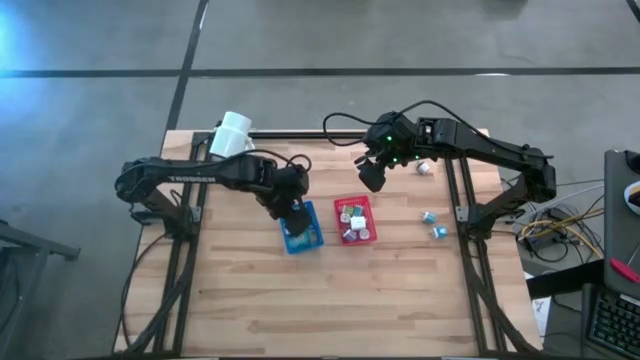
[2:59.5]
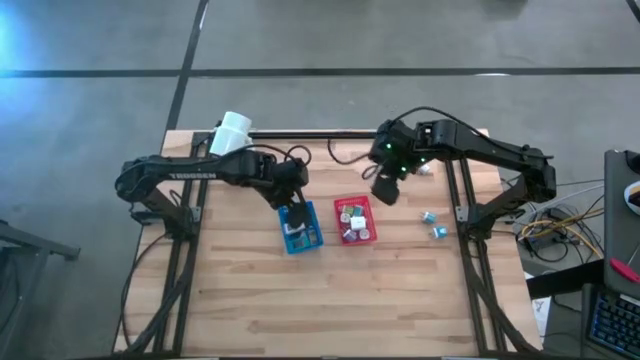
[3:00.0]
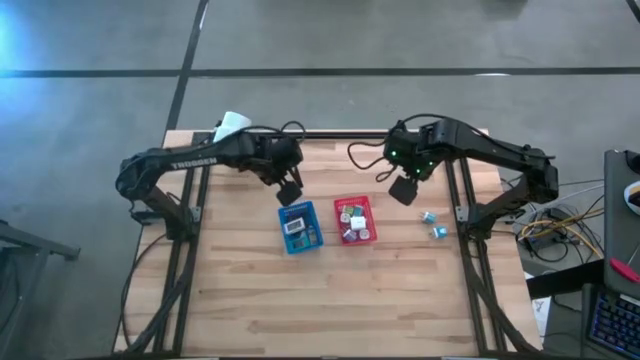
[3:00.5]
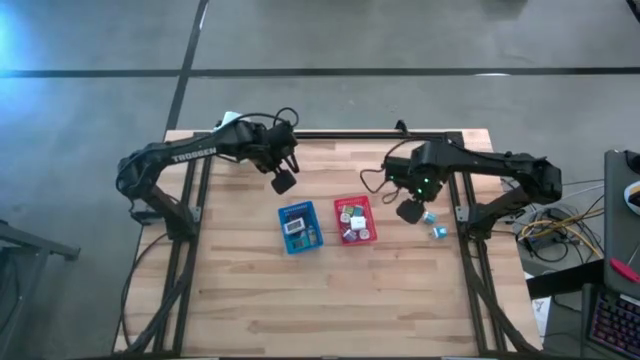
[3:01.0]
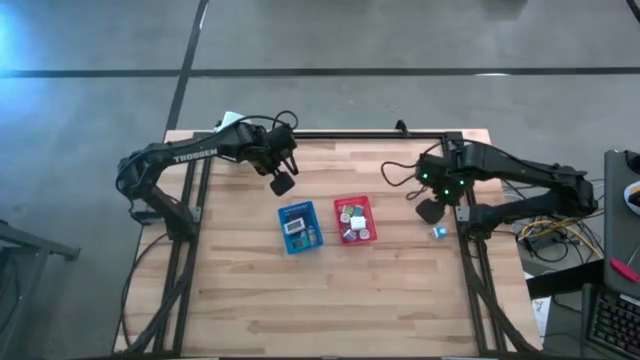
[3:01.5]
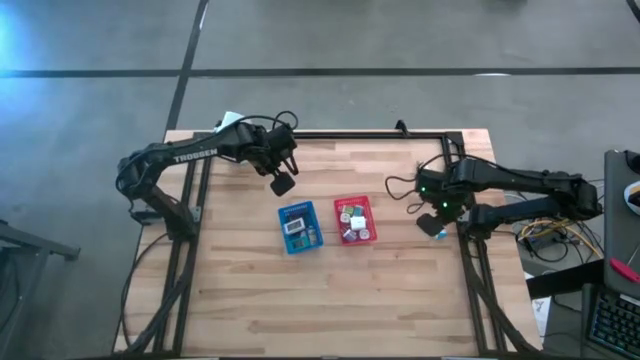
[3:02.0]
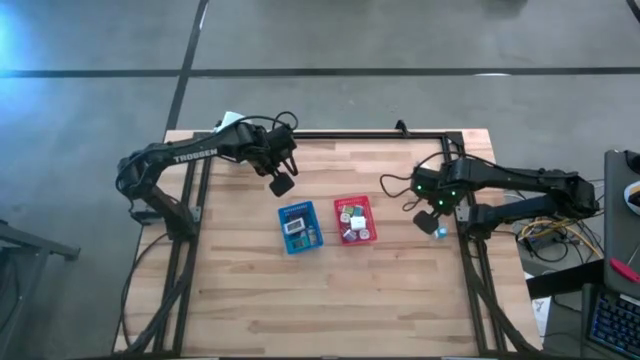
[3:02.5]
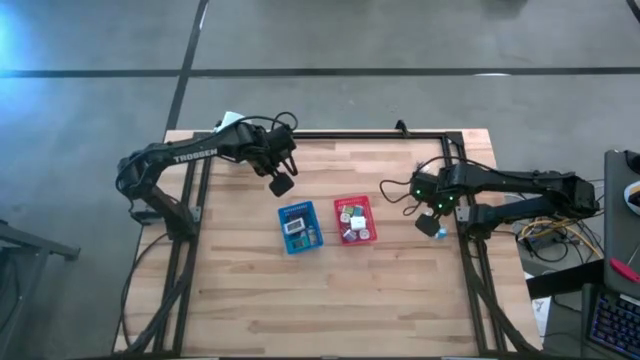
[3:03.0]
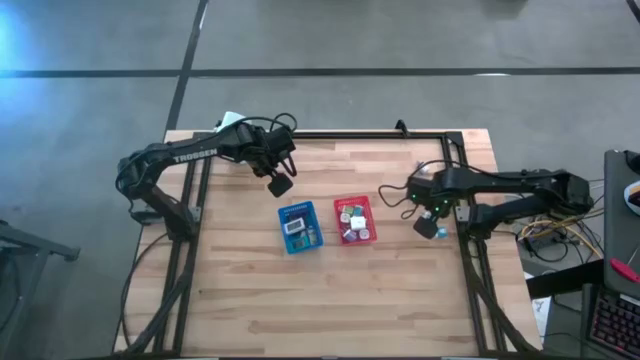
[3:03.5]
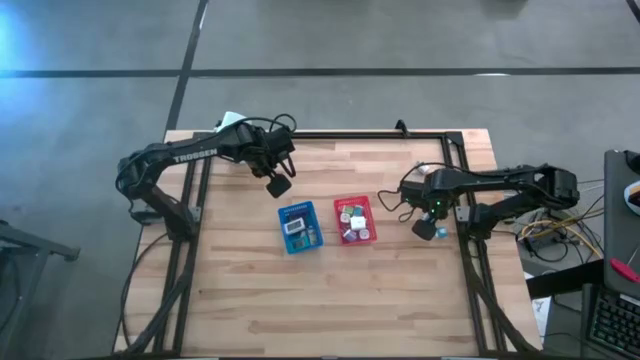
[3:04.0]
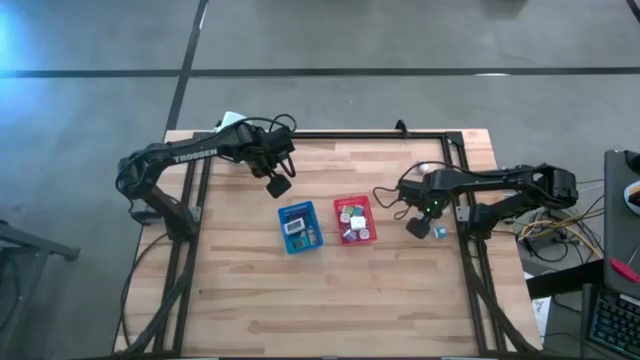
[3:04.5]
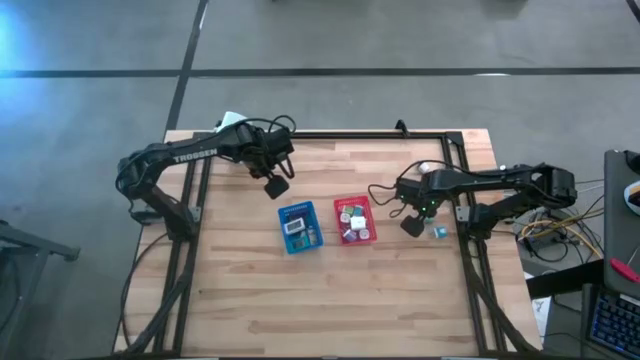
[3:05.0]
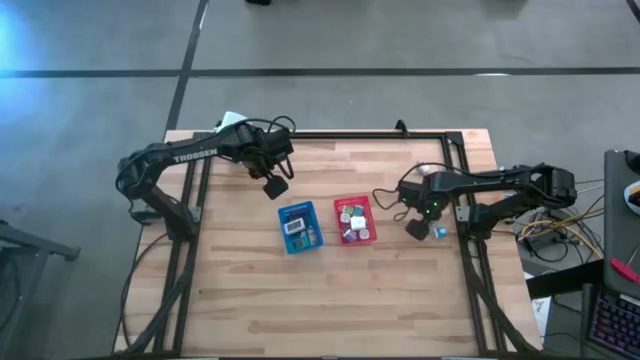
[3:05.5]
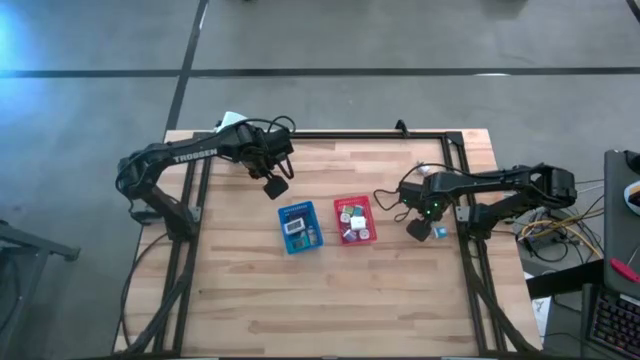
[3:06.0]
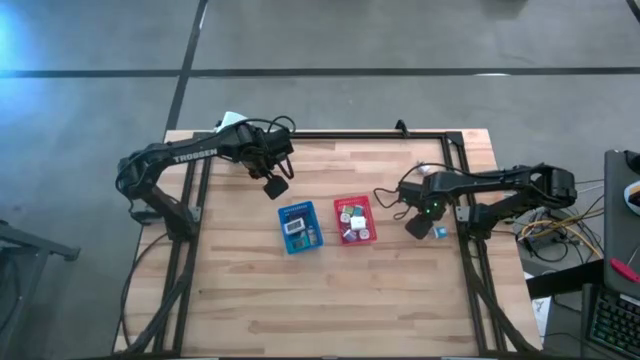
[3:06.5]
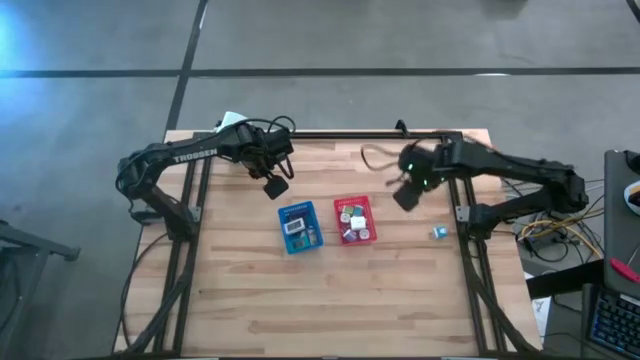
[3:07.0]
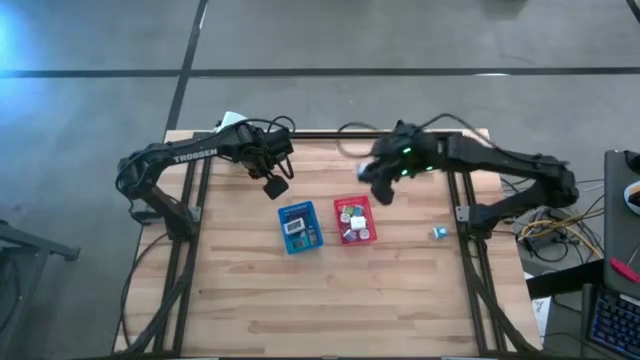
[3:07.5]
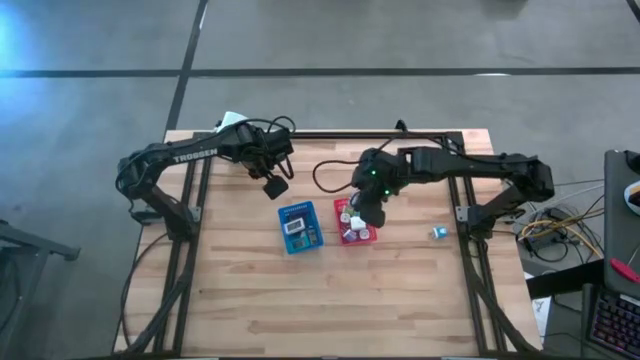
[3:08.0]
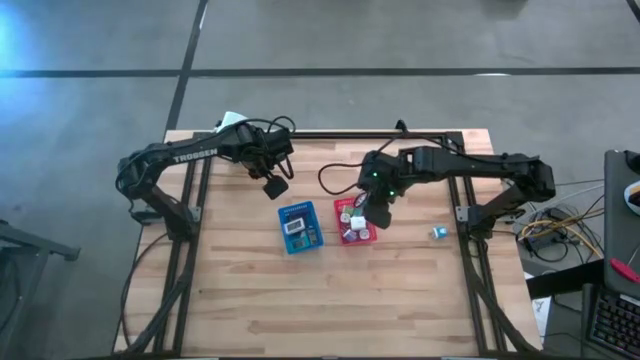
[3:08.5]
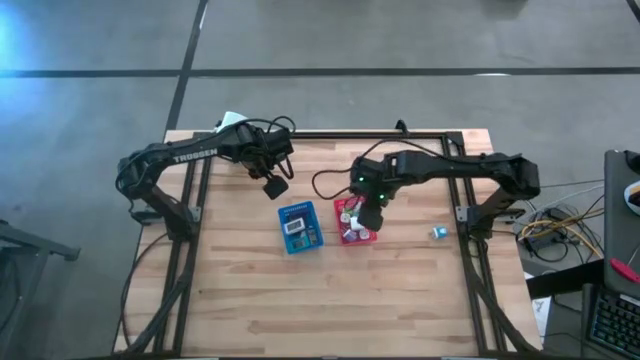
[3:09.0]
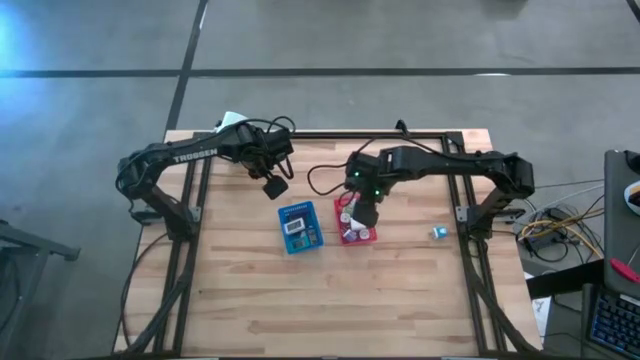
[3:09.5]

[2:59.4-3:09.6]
Task: Pick & Place Office items
Put the top blue charger adapter into the red bin

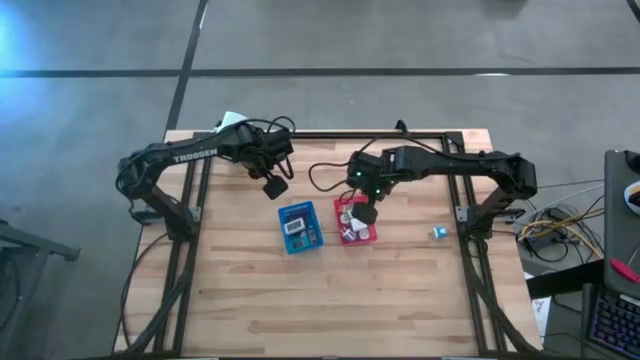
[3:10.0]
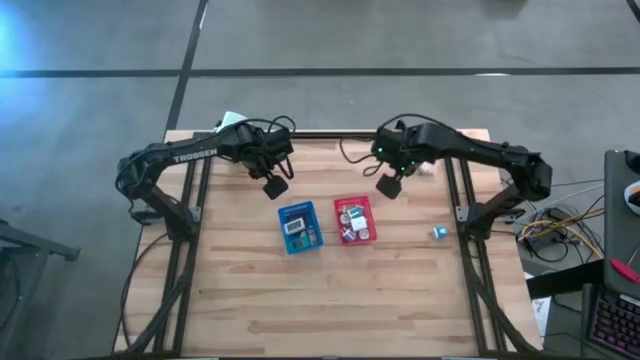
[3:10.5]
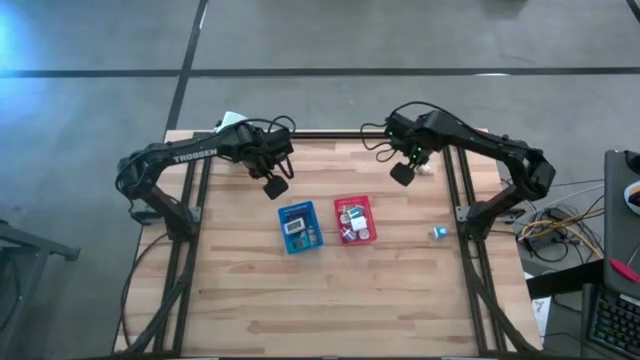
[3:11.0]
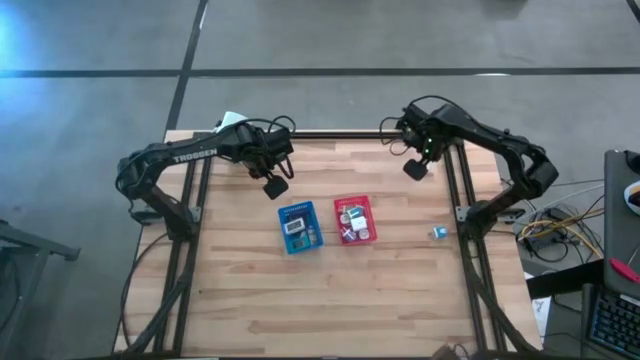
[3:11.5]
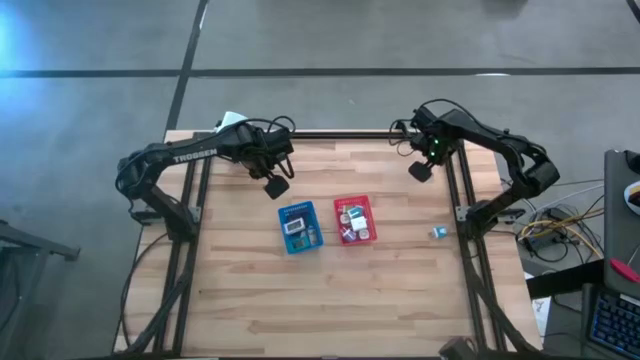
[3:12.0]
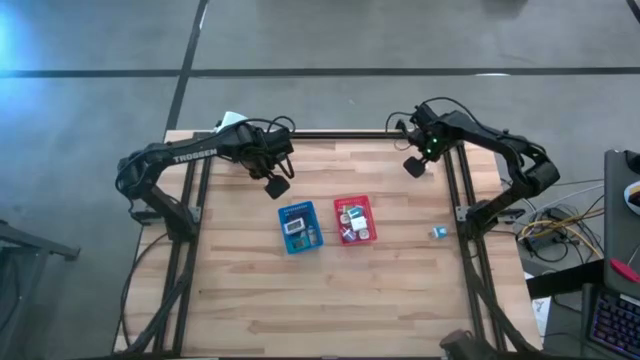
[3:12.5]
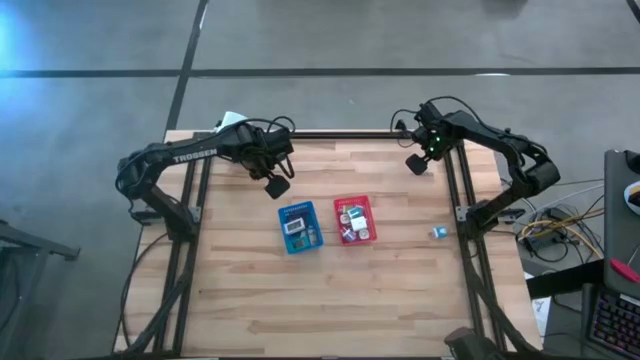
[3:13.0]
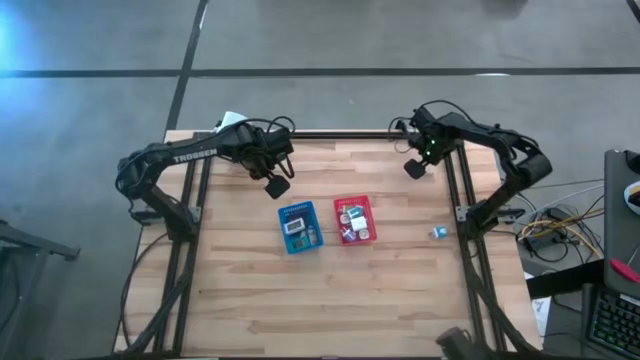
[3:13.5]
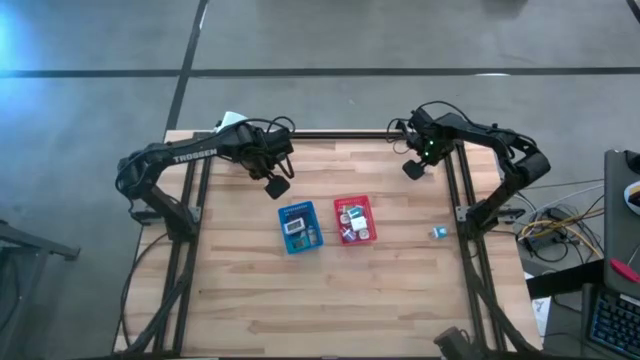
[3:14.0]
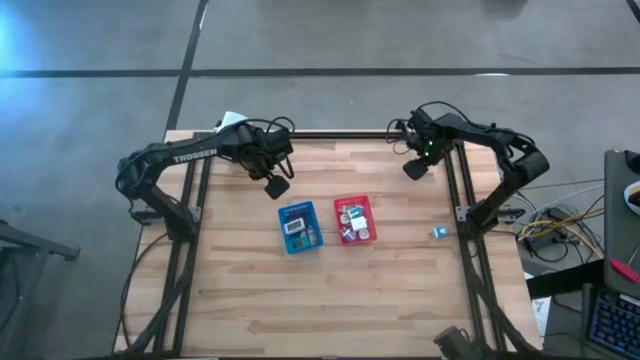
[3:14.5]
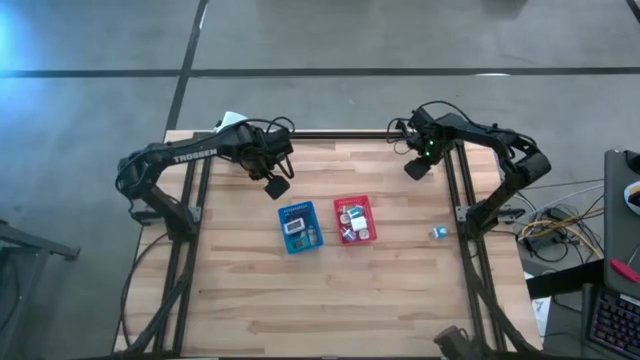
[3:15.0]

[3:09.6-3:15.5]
Put the white black charger adapter into the red bin

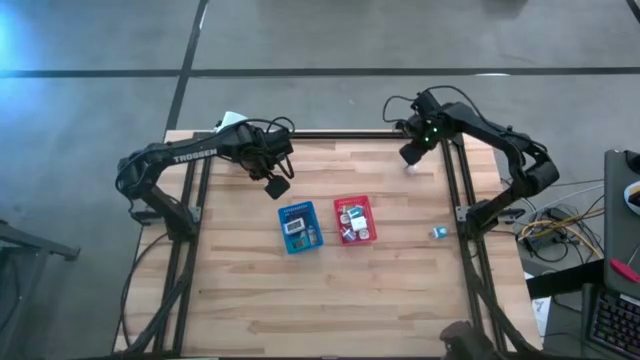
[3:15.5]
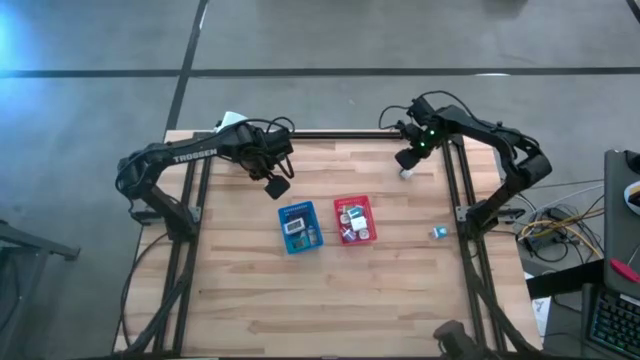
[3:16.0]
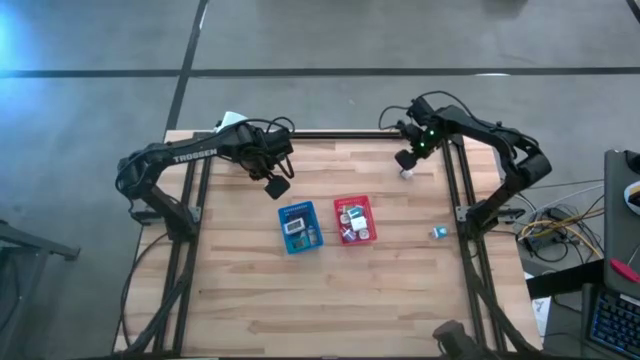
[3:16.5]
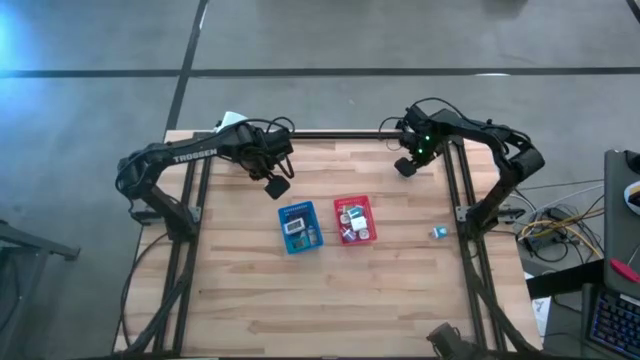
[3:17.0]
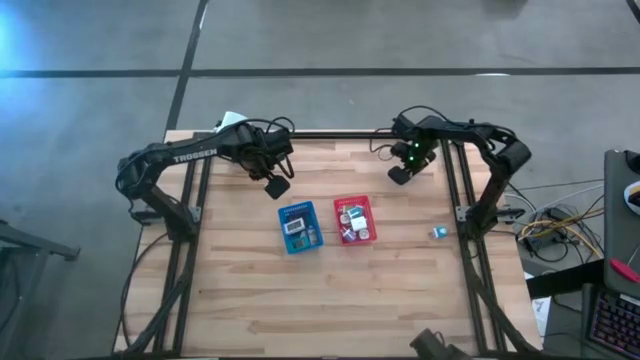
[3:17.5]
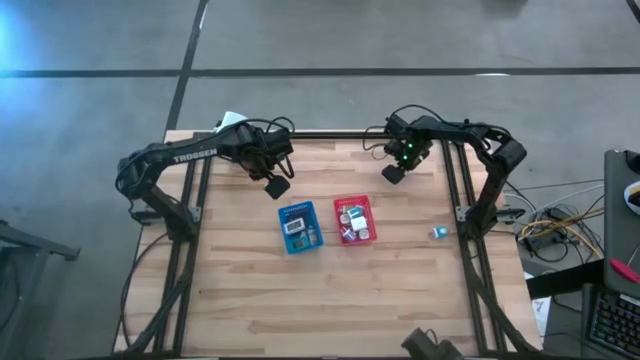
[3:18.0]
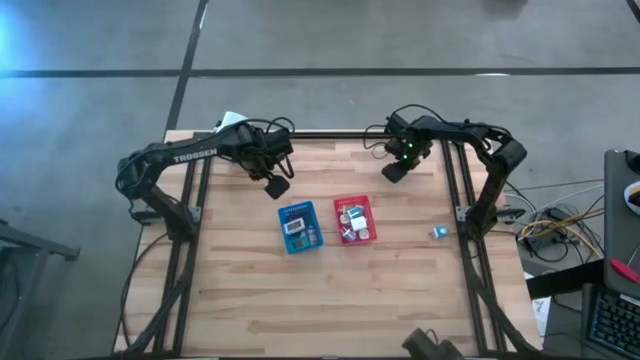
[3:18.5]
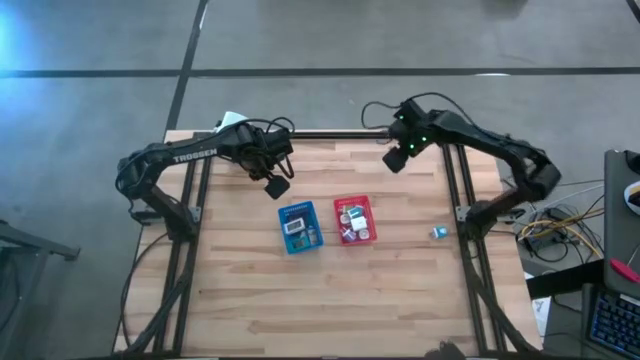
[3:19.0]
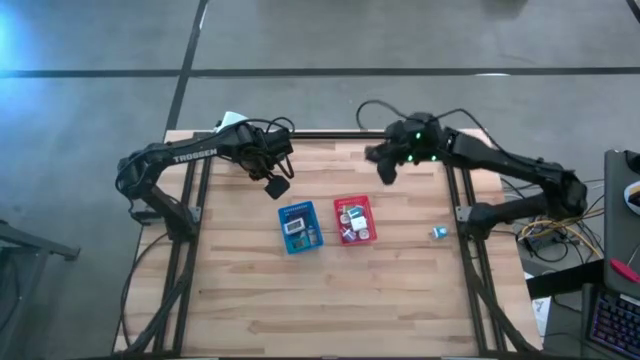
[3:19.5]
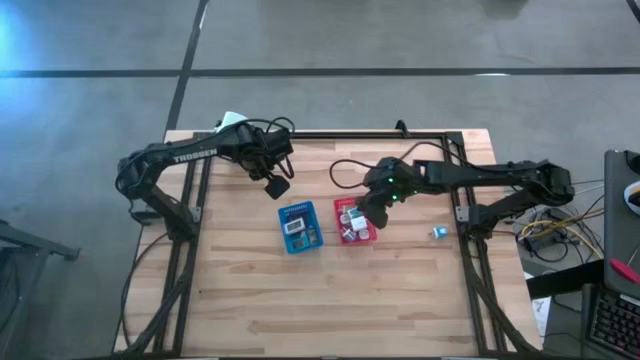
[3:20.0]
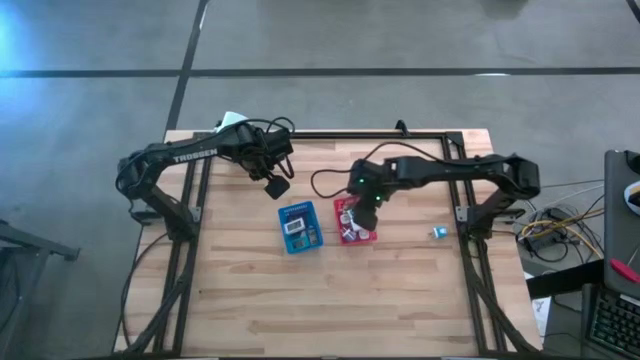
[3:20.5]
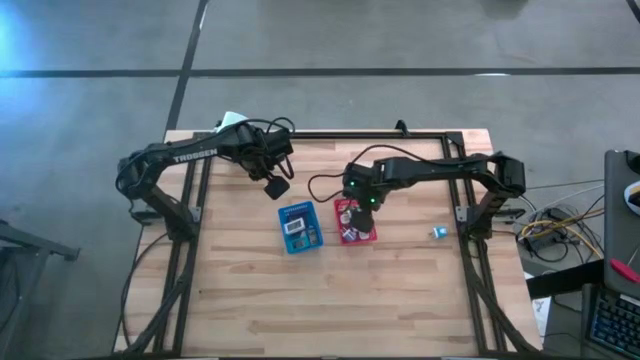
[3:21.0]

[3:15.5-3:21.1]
Put the white black charger adapter into the red bin
